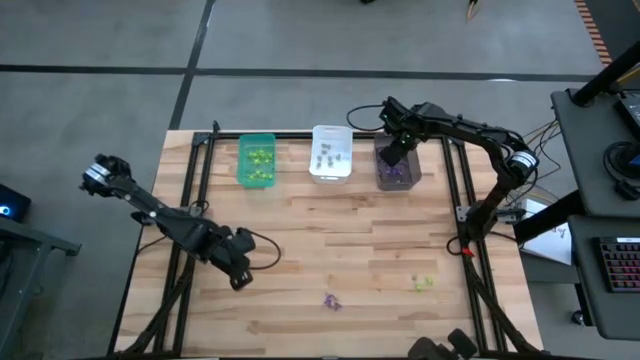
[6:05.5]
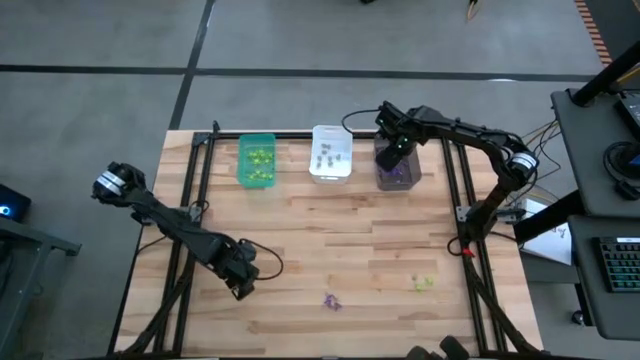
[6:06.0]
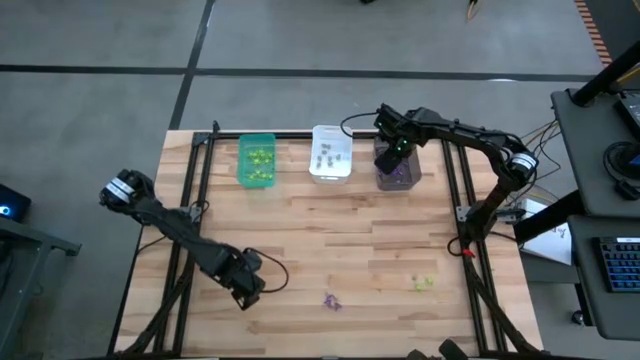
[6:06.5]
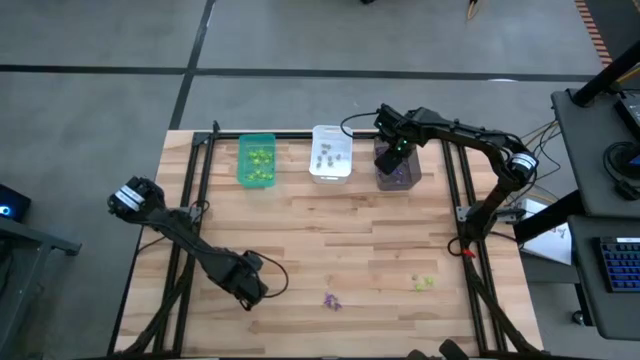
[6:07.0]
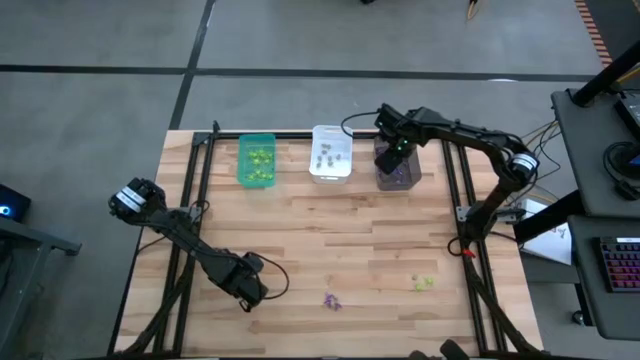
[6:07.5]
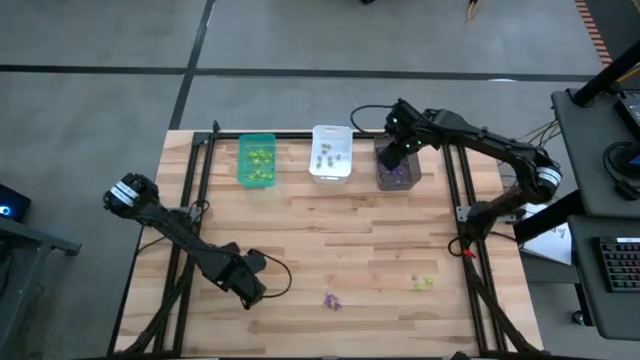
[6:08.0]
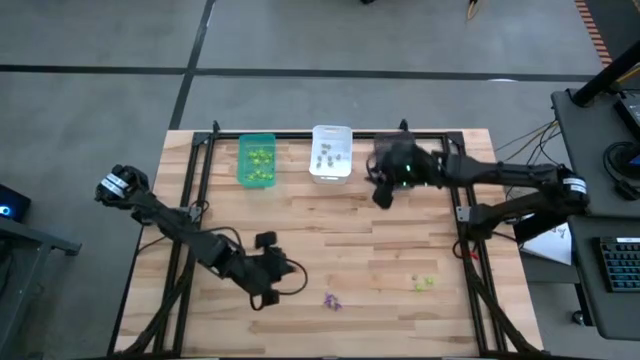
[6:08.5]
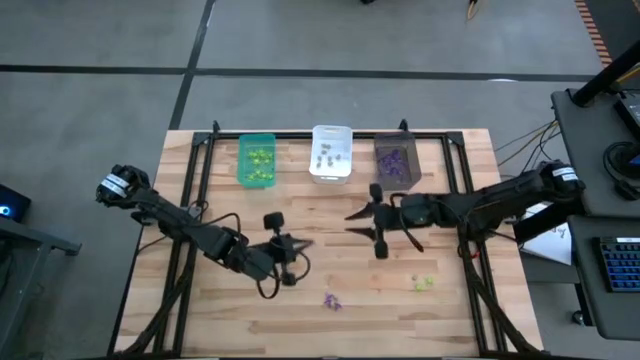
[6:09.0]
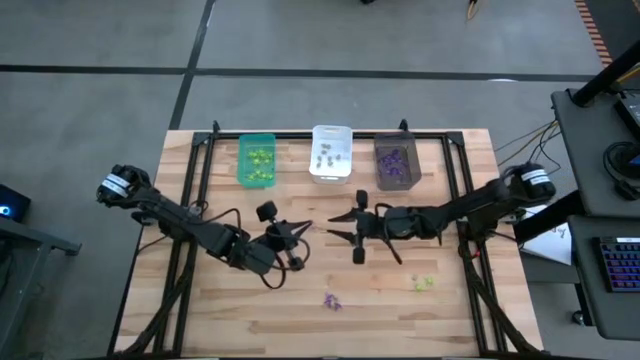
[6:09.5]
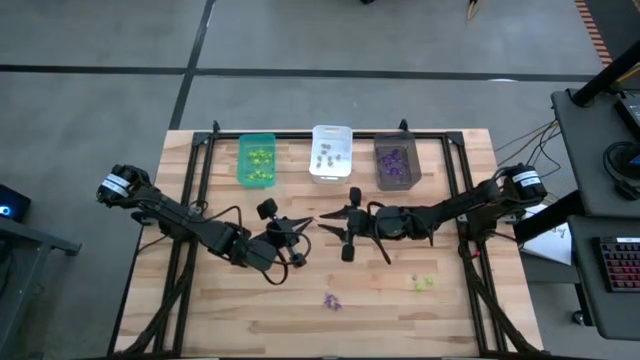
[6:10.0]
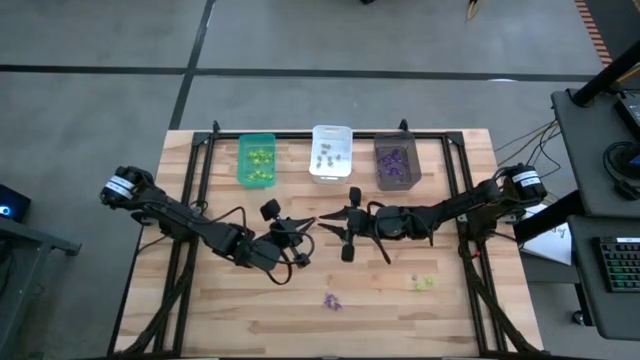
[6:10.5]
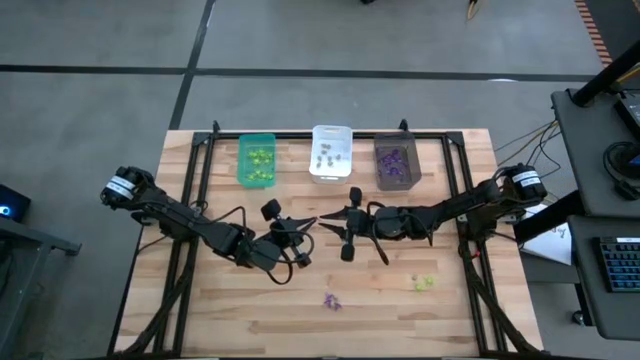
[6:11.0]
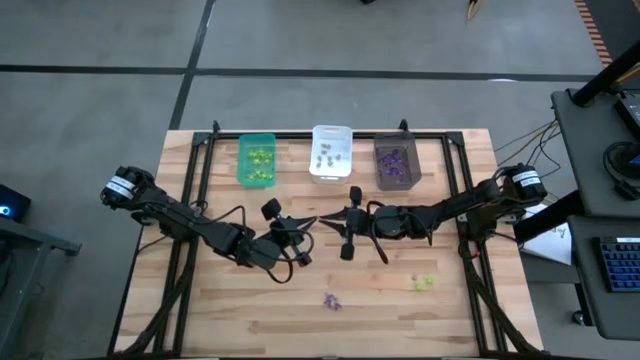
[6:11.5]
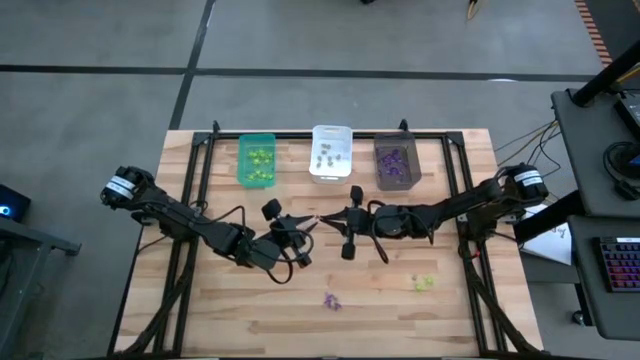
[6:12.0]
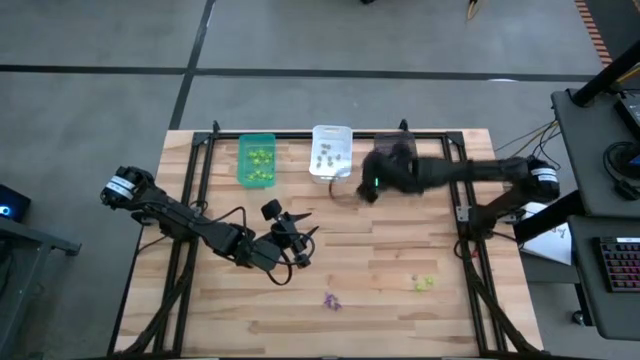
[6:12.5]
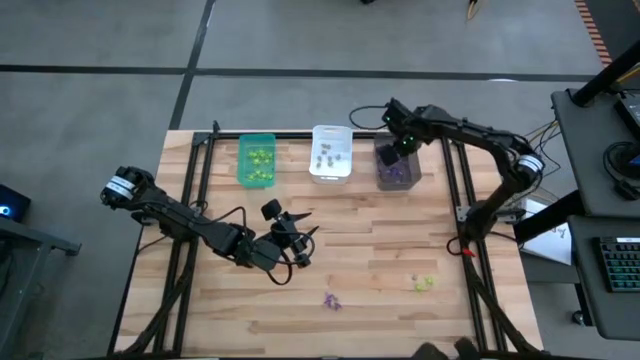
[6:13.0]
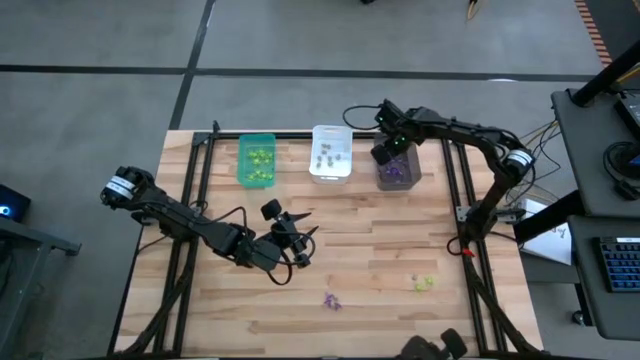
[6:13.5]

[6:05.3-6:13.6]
Task: Sort Halloween decoration
Put the purple witch hat toy into the gray bin

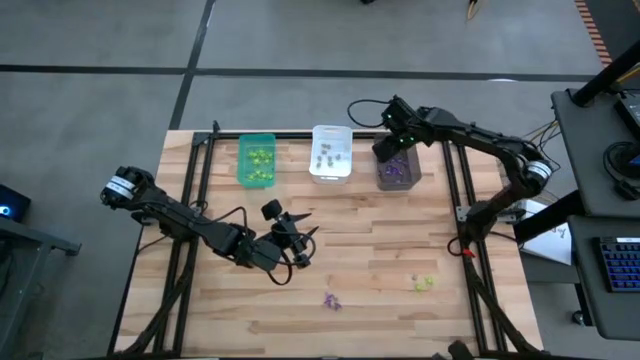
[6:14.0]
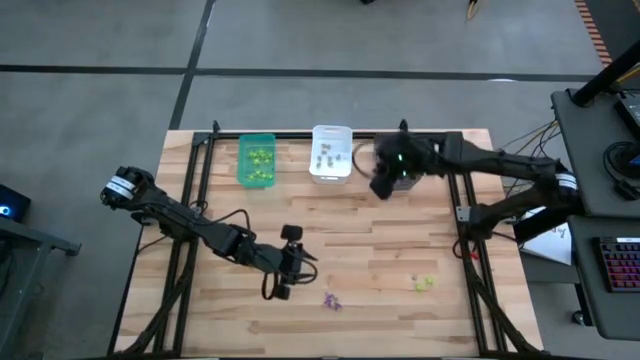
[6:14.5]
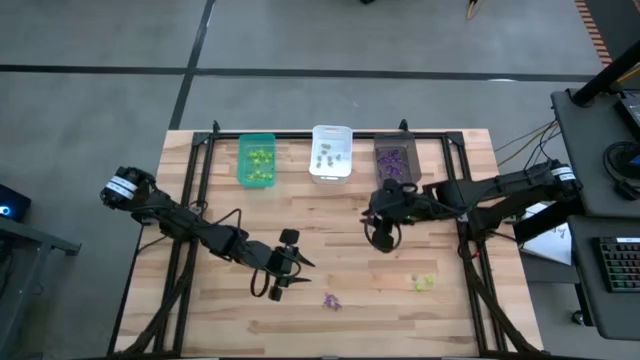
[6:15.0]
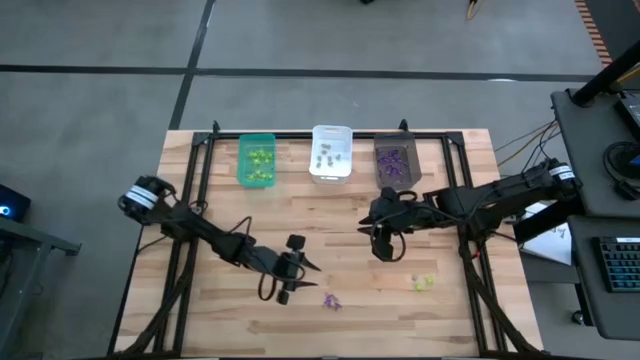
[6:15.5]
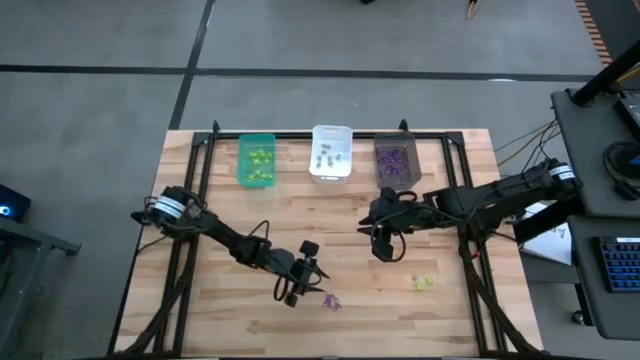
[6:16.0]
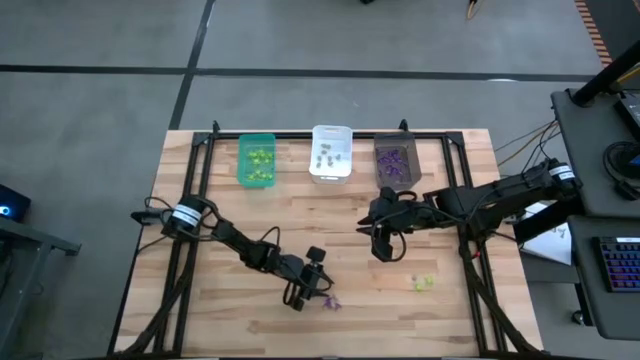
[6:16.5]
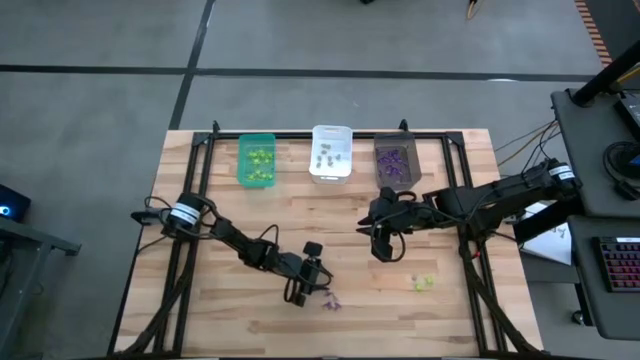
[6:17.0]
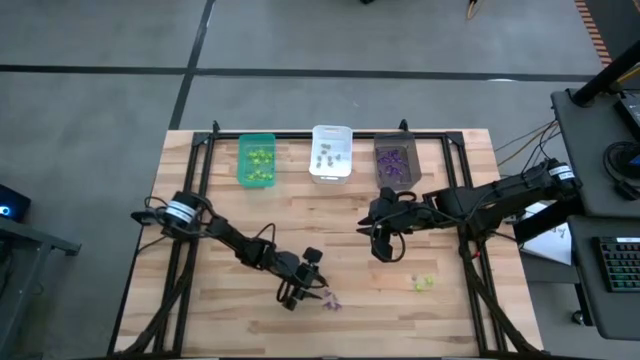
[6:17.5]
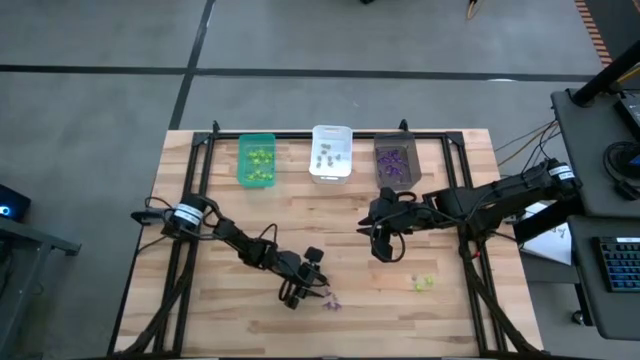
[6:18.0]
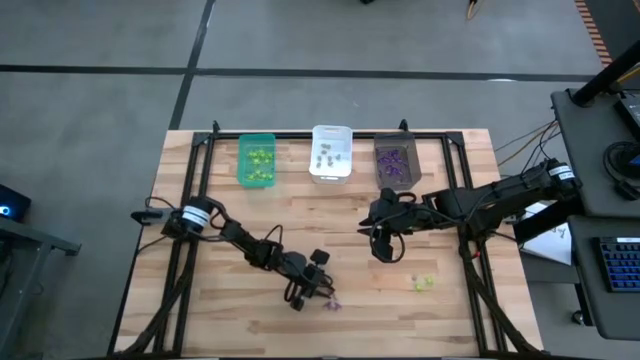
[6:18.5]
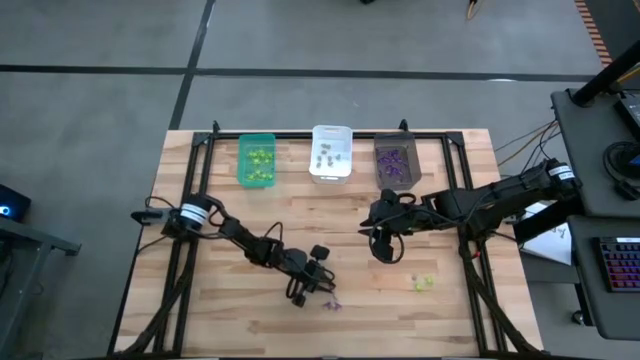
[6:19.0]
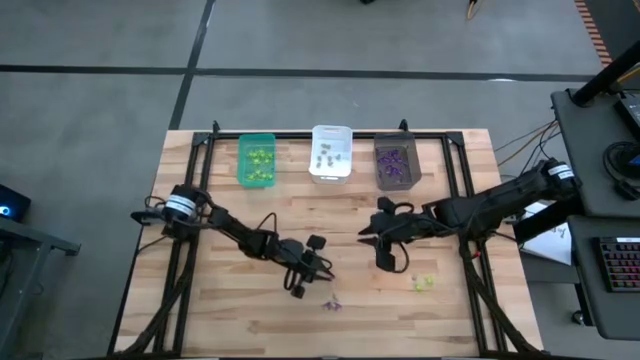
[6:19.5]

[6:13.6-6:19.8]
Put the purple witch hat toy into the gray bin

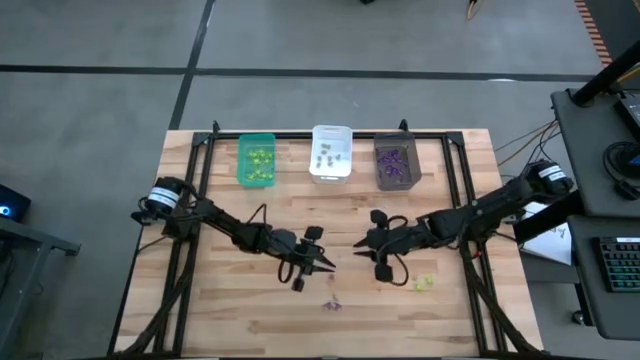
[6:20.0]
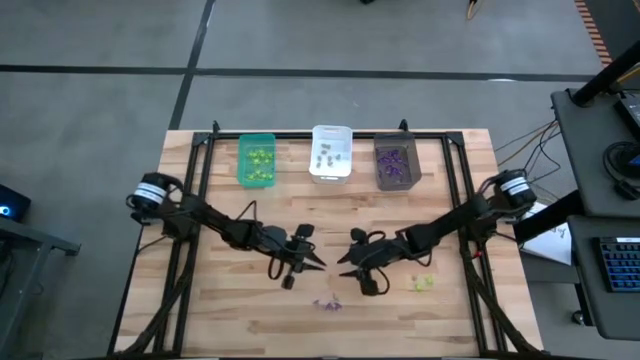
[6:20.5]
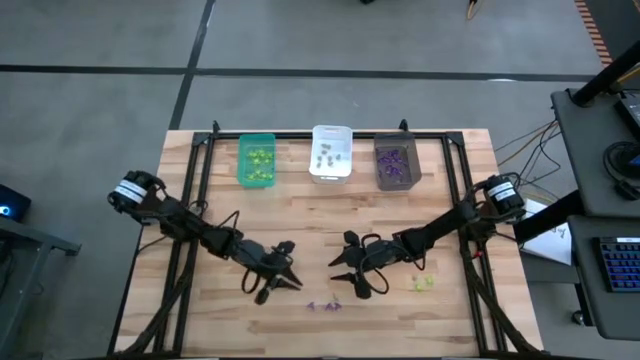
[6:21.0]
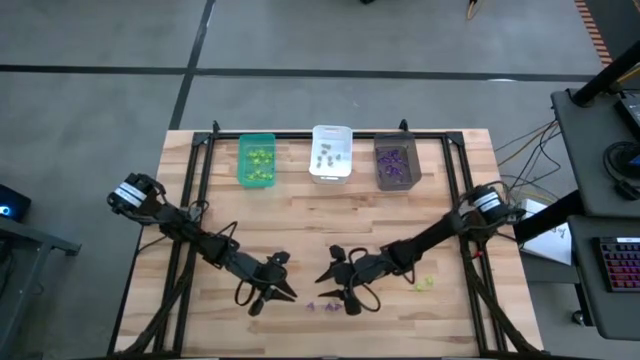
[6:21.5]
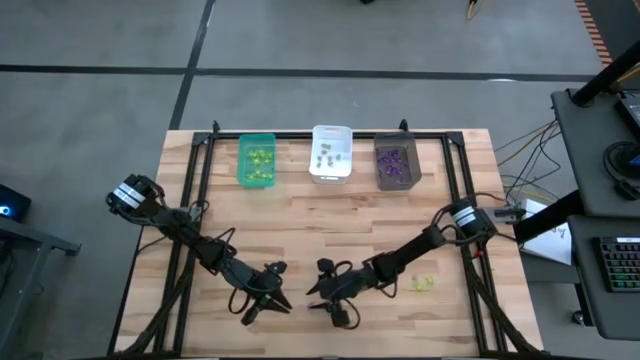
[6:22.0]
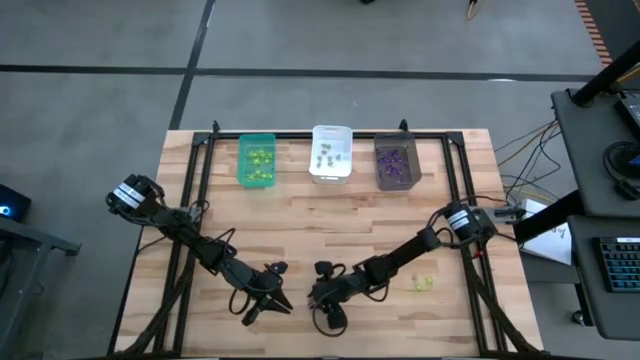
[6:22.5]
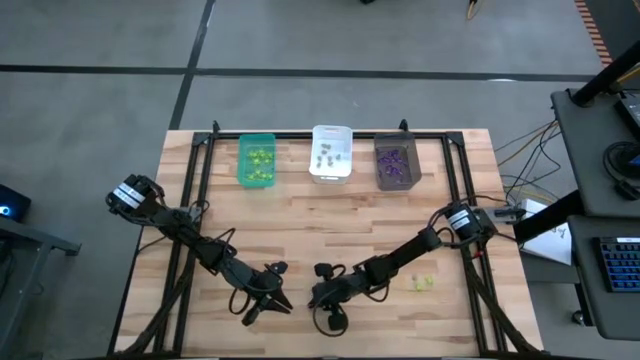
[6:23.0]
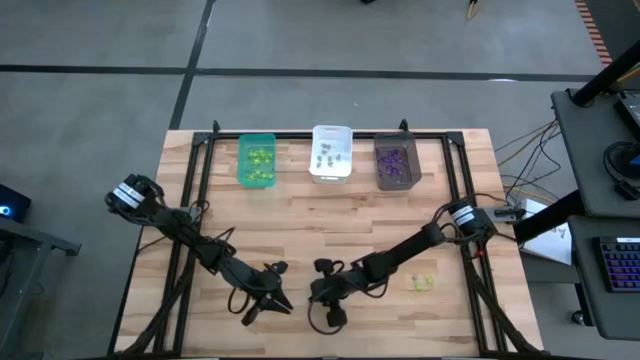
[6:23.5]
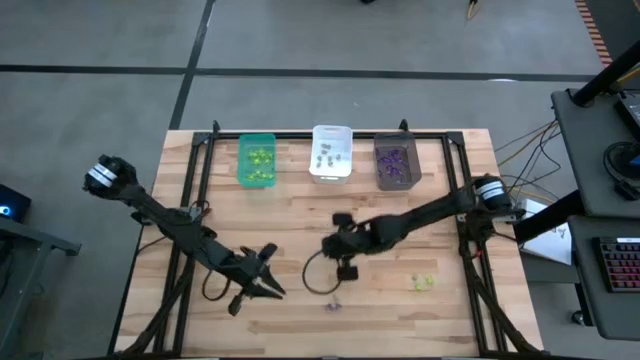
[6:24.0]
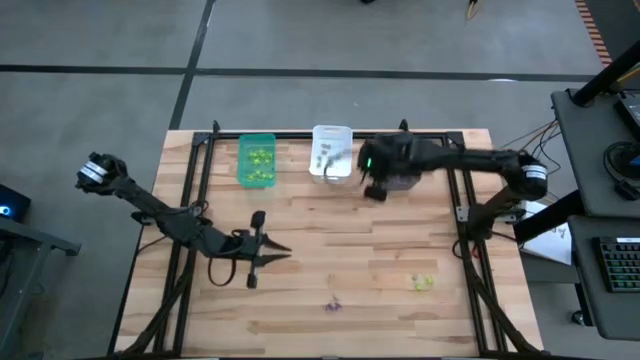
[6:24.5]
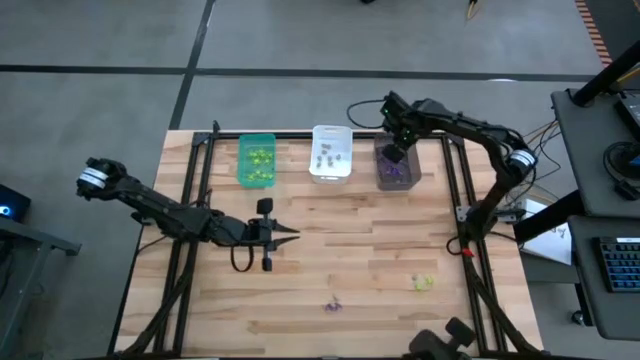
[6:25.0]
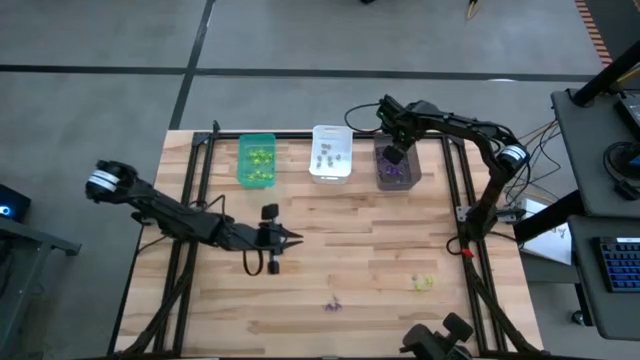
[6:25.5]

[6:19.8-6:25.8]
Put the purple witch hat toy into the gray bin
